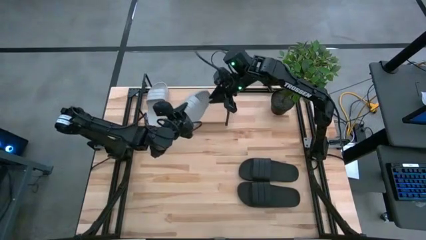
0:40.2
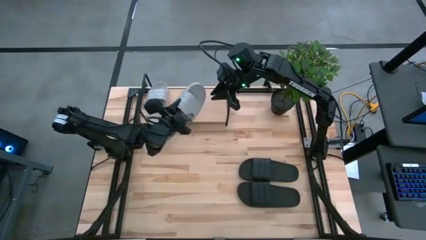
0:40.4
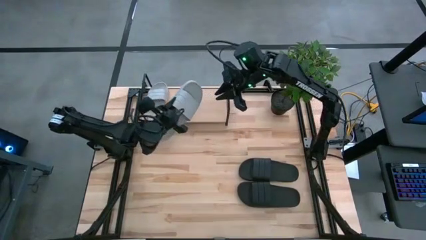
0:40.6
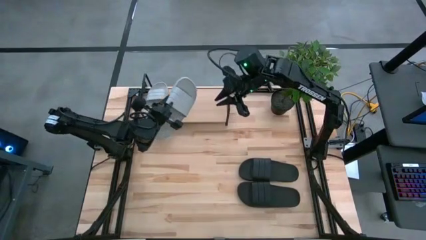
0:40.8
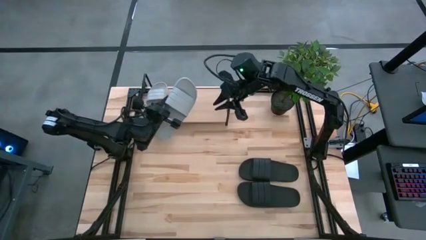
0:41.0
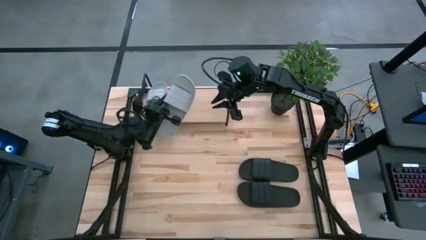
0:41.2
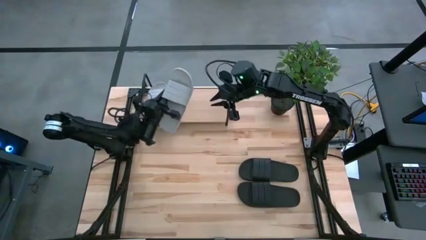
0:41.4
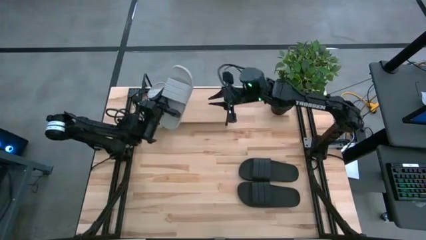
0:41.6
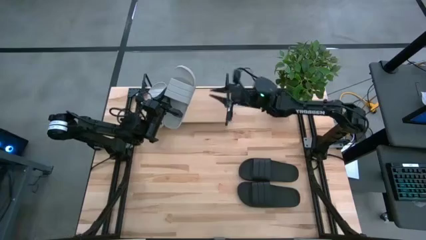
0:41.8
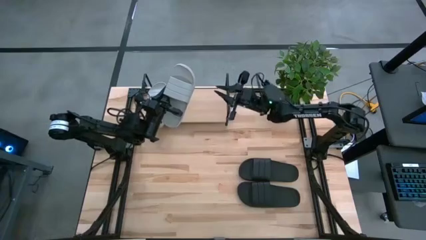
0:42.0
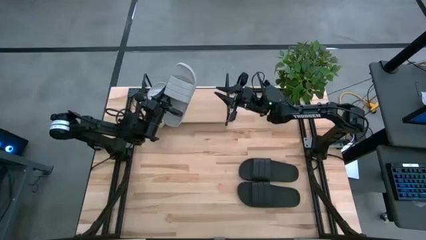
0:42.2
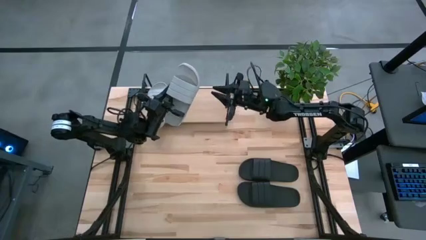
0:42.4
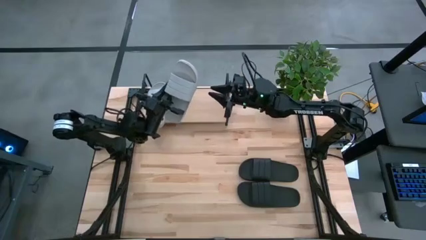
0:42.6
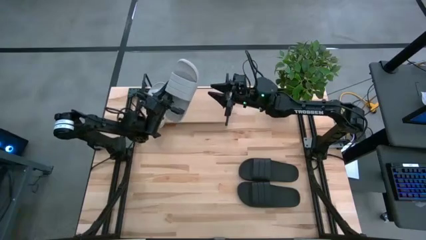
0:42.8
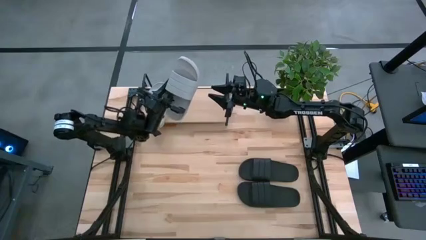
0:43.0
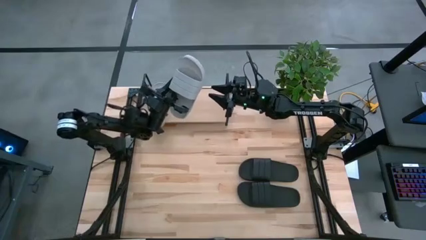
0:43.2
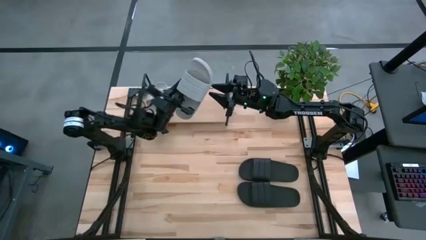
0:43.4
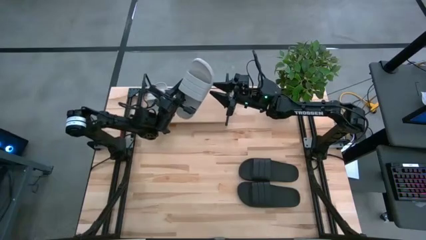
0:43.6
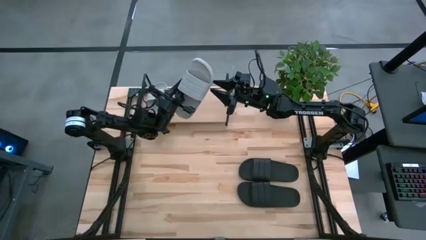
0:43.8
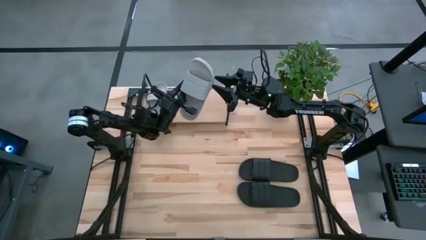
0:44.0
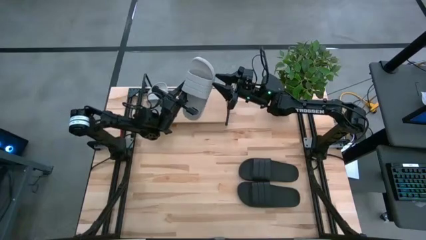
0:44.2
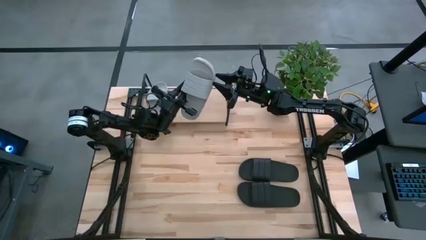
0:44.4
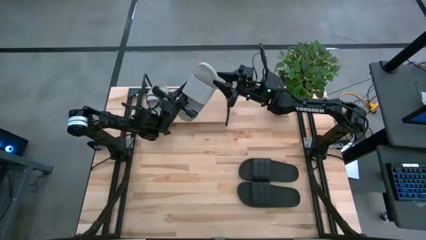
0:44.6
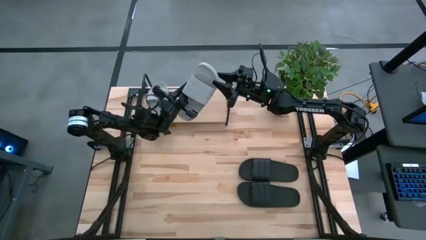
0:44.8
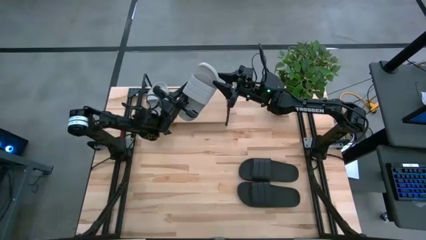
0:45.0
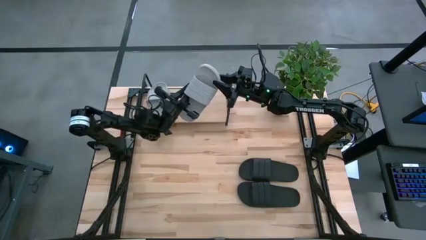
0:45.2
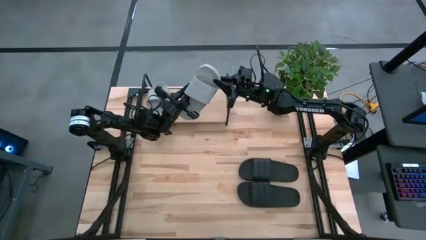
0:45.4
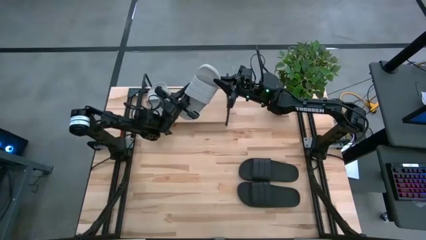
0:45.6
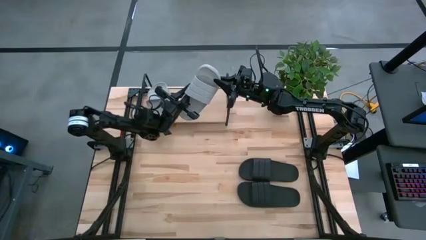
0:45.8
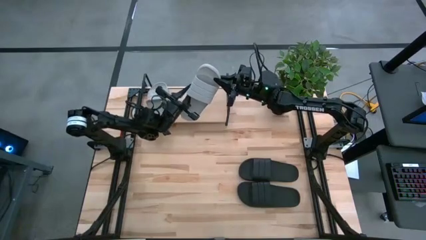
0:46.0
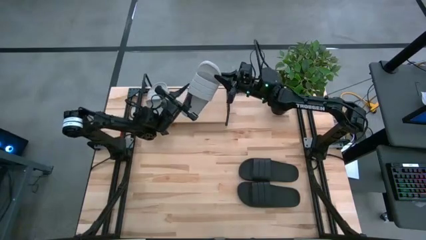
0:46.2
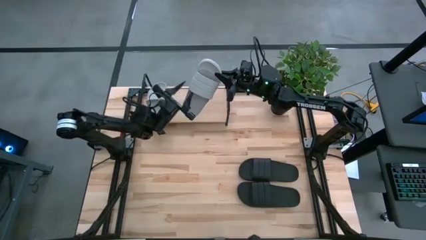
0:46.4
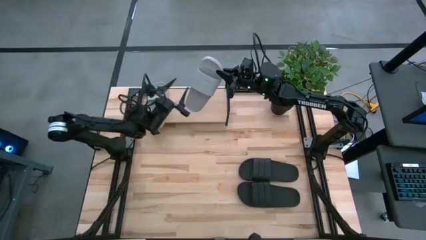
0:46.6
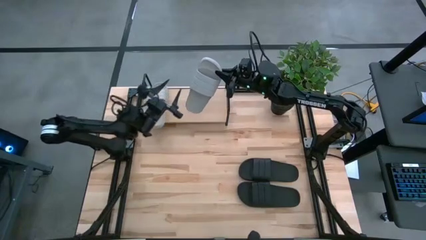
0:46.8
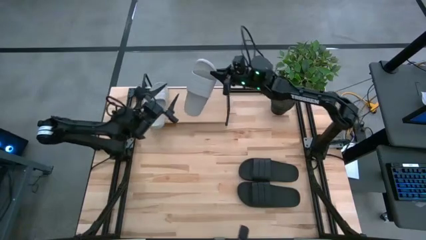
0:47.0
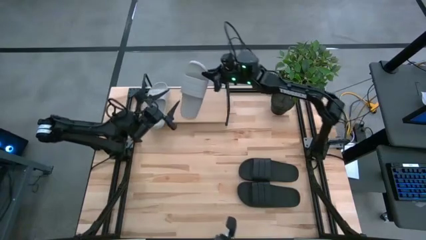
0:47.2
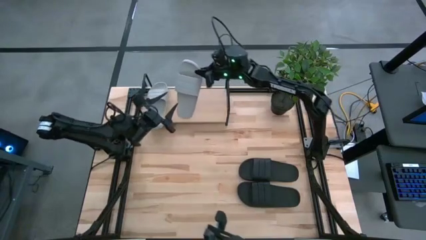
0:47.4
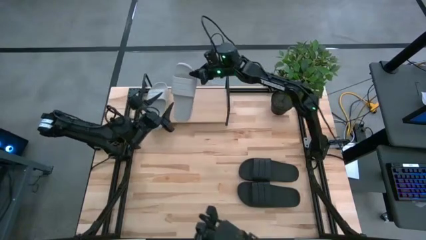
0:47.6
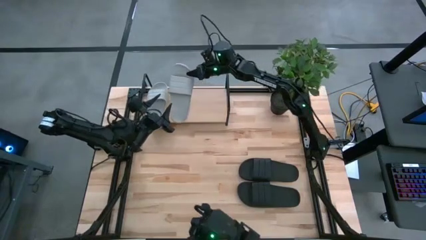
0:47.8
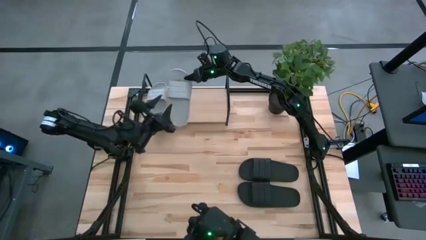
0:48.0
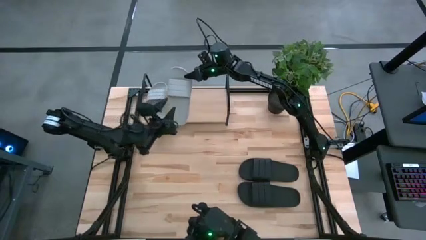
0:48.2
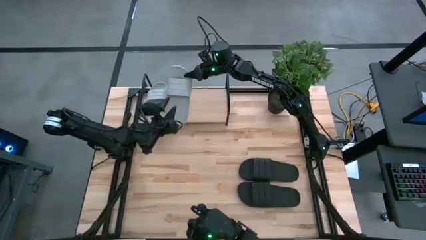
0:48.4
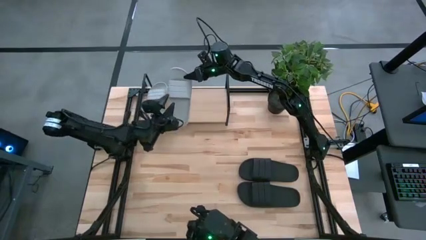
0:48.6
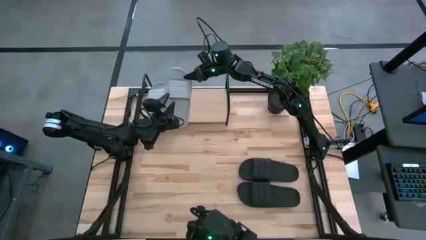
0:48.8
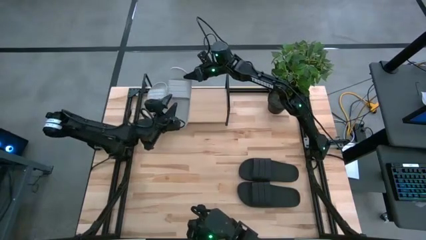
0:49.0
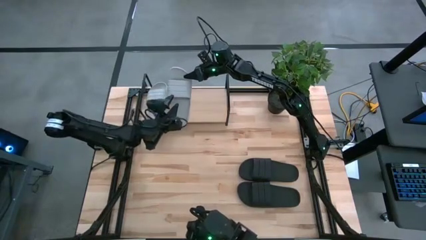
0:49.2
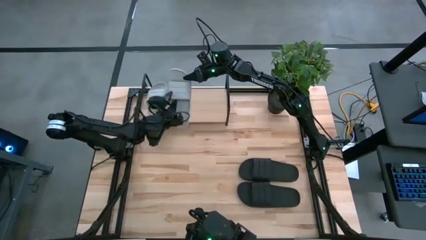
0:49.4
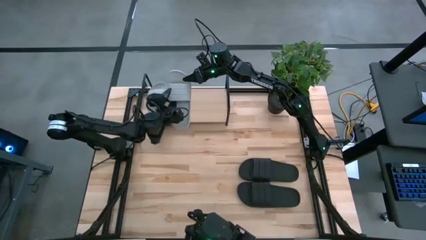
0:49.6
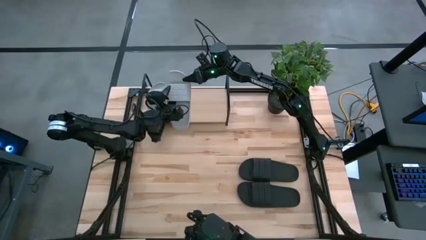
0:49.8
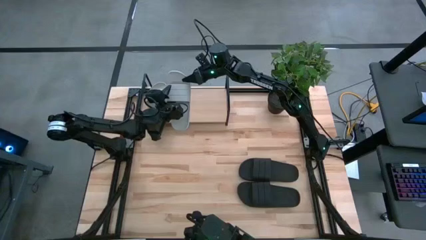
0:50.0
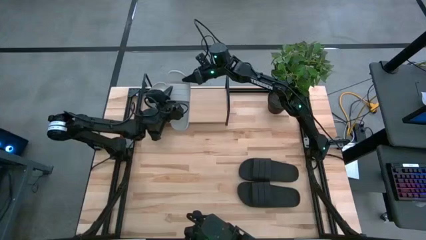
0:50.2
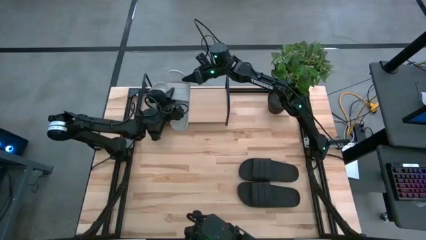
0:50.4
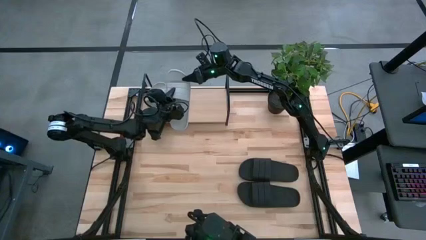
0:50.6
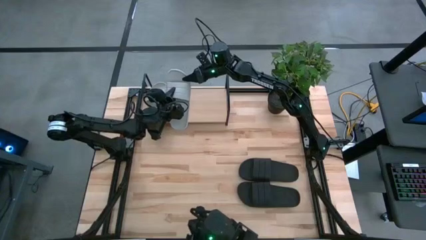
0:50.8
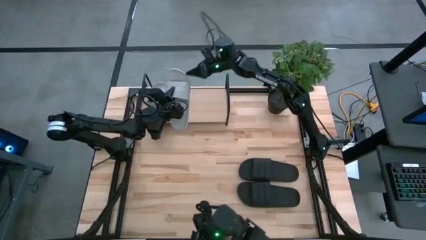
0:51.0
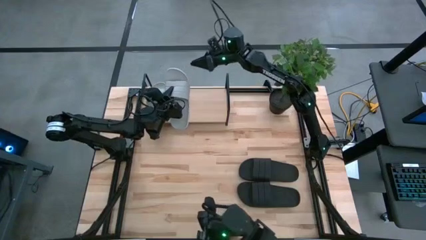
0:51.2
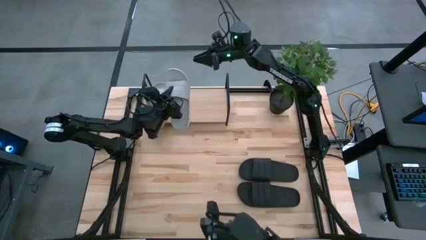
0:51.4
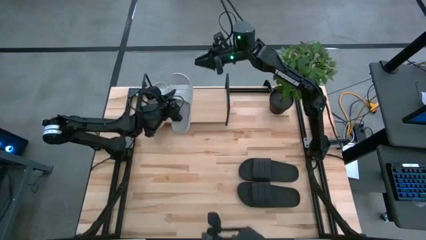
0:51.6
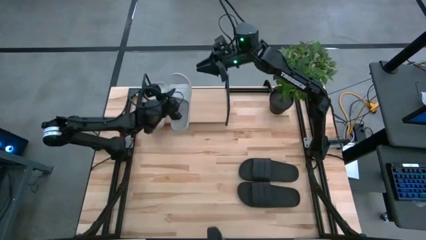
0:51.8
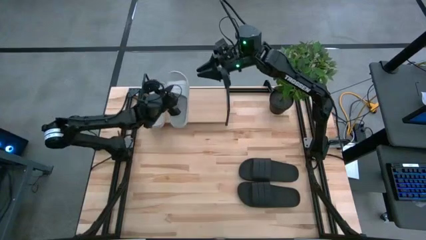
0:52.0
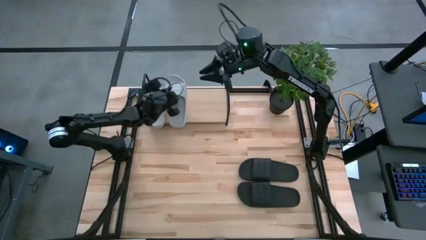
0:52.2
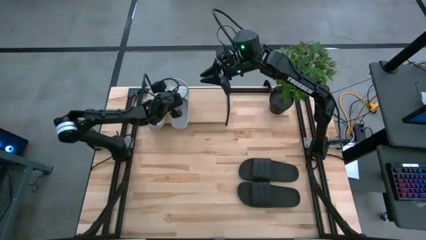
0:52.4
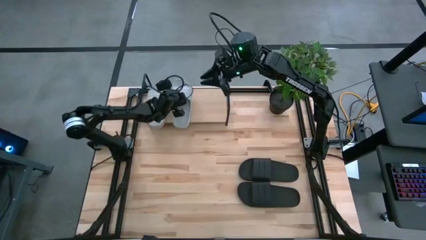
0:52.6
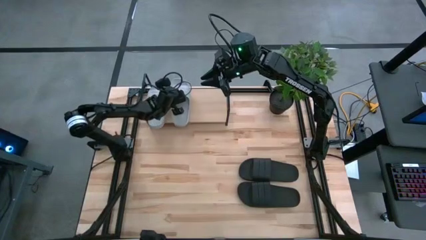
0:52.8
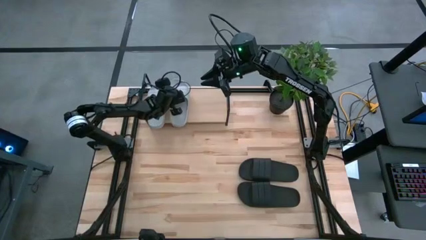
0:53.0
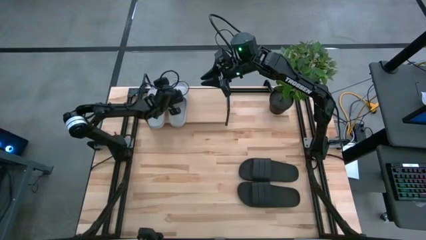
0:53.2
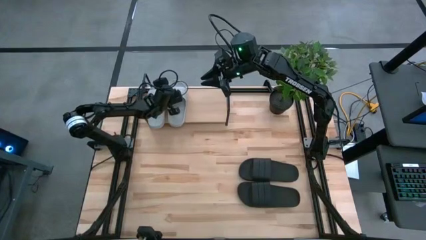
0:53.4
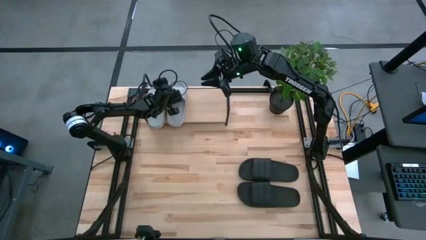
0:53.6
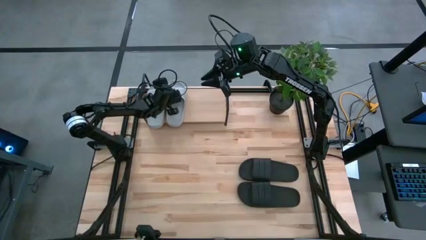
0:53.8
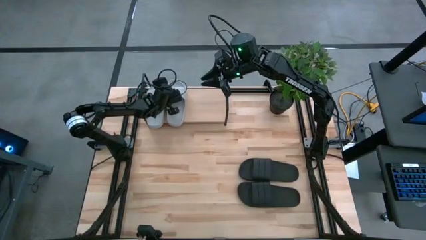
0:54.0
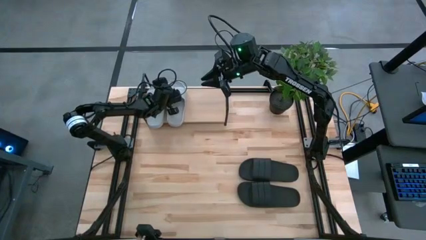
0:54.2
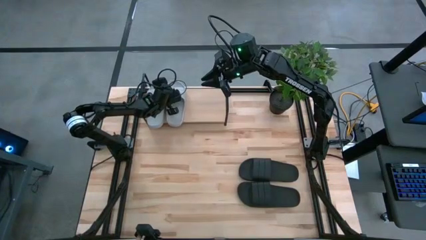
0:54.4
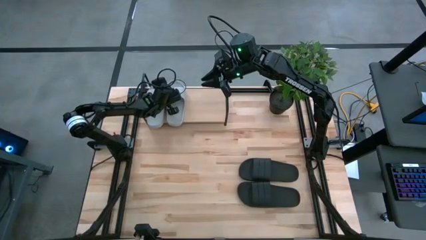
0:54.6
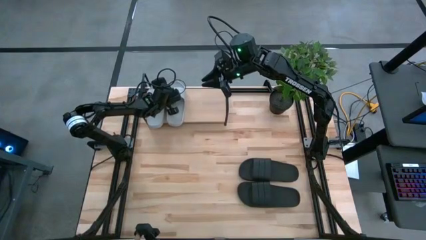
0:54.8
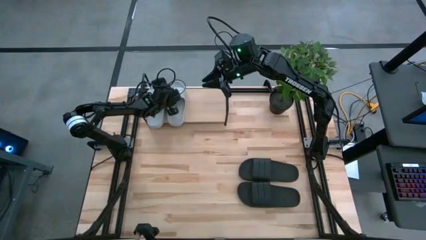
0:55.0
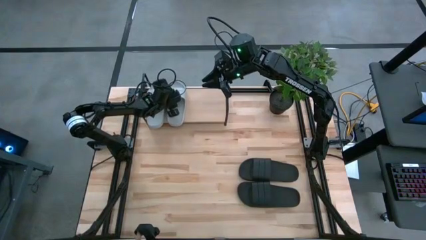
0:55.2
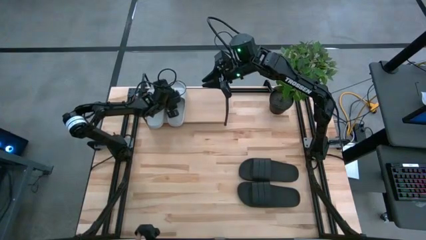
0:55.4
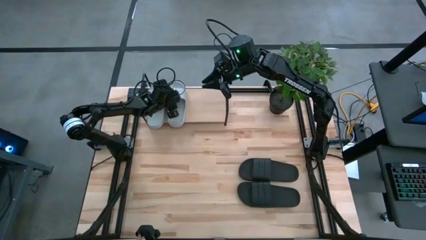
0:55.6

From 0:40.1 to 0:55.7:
Task: Pick and place slides into the shelf
Put the gray slides on the shelf
